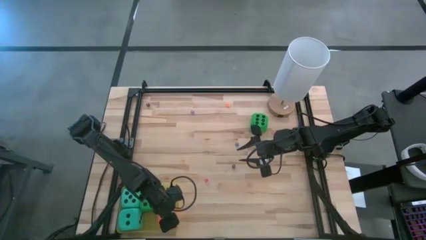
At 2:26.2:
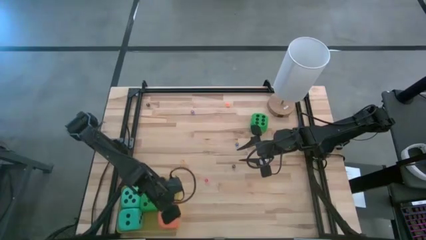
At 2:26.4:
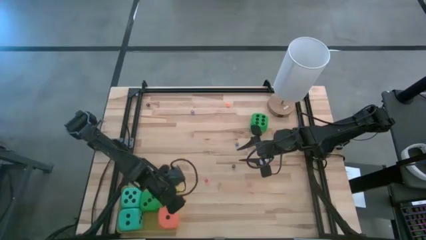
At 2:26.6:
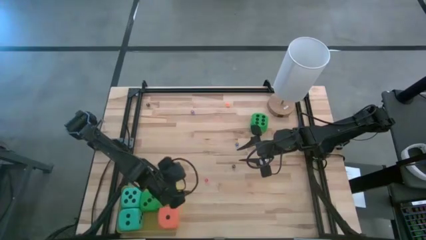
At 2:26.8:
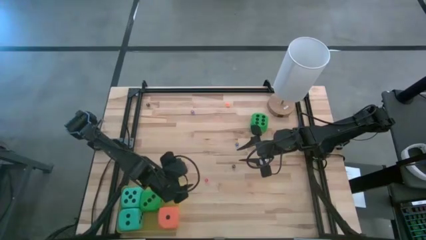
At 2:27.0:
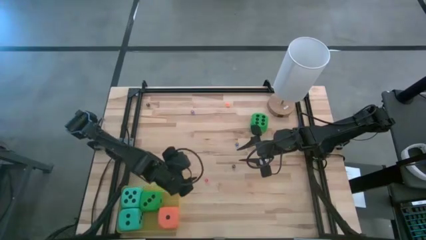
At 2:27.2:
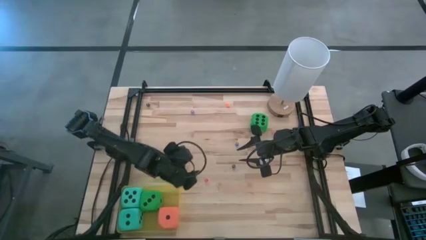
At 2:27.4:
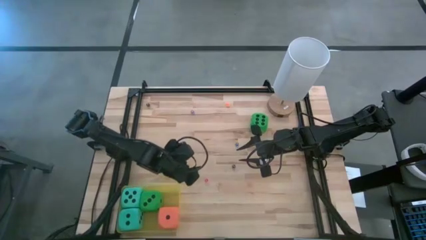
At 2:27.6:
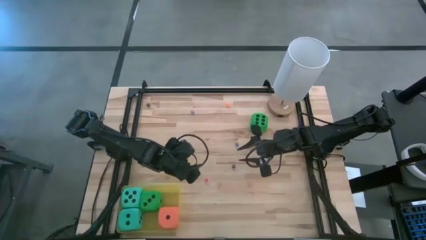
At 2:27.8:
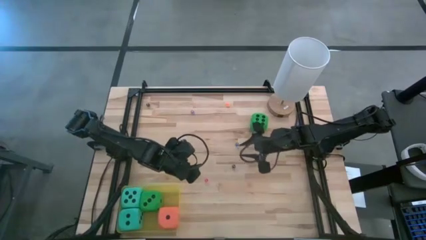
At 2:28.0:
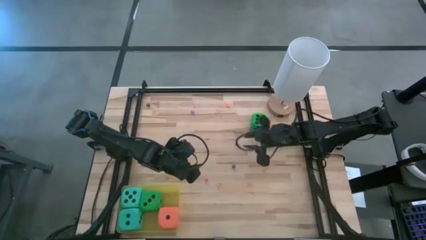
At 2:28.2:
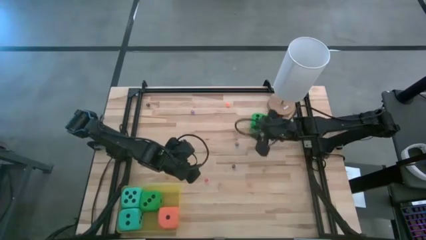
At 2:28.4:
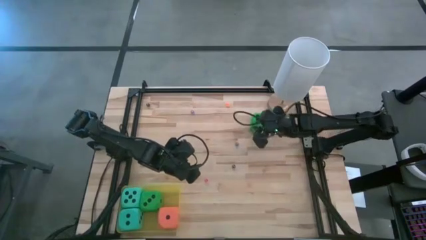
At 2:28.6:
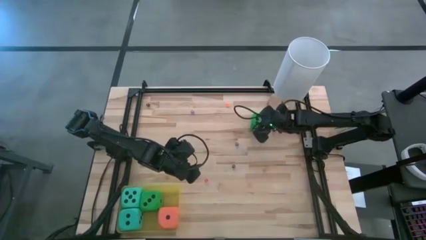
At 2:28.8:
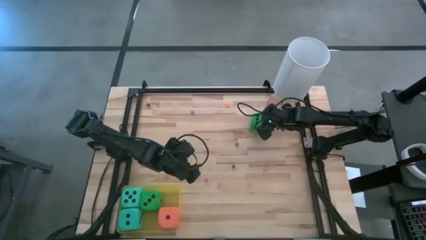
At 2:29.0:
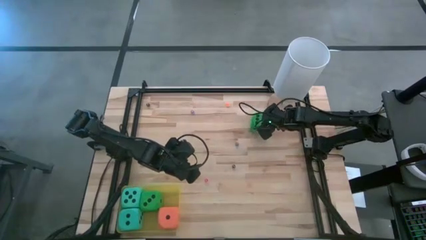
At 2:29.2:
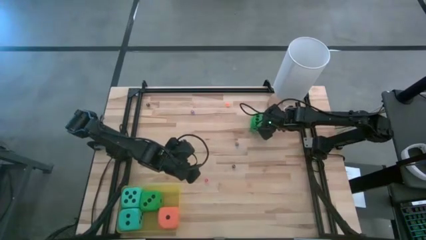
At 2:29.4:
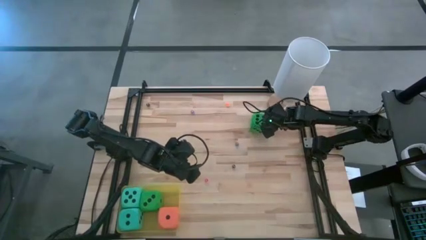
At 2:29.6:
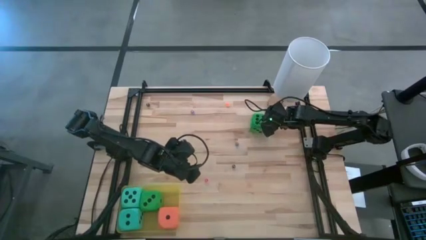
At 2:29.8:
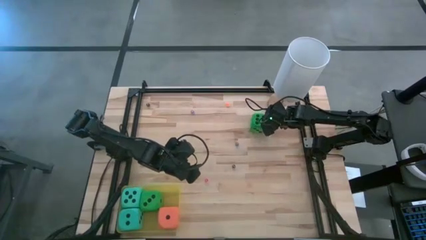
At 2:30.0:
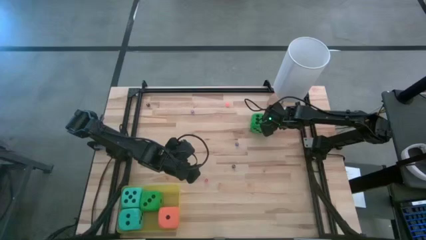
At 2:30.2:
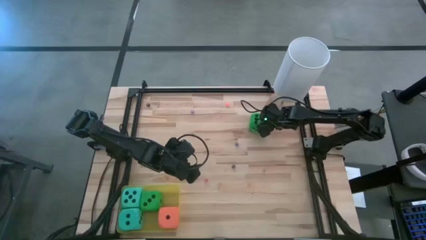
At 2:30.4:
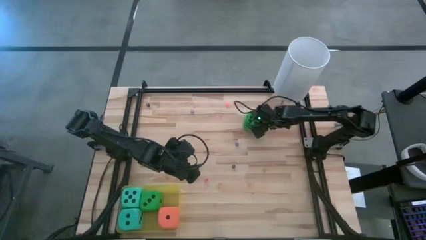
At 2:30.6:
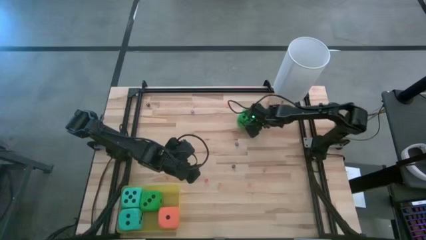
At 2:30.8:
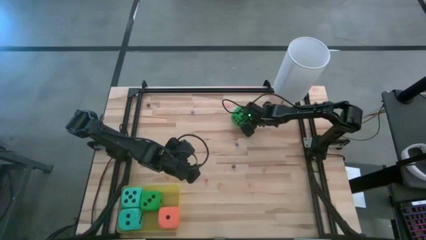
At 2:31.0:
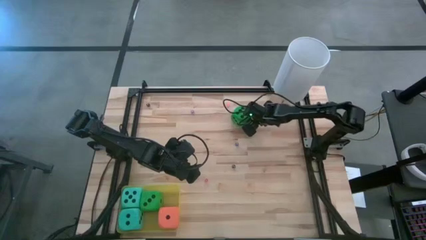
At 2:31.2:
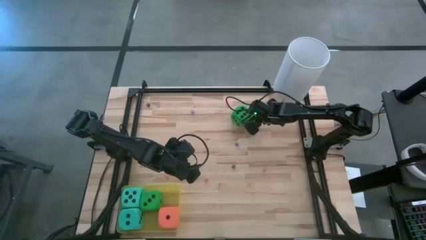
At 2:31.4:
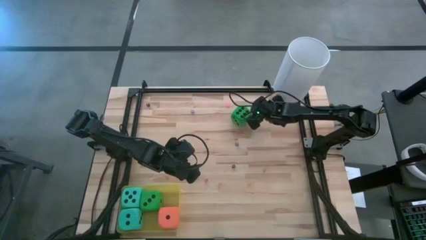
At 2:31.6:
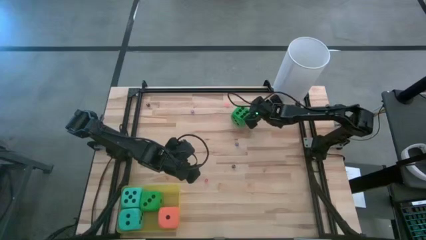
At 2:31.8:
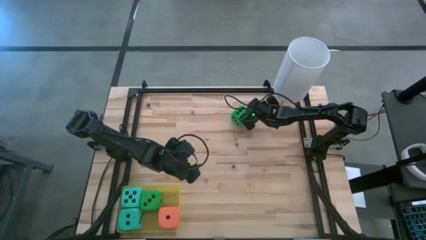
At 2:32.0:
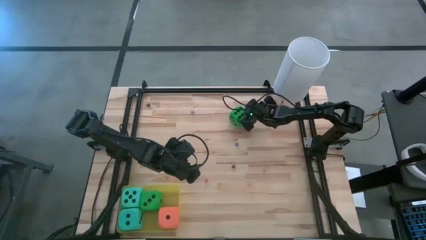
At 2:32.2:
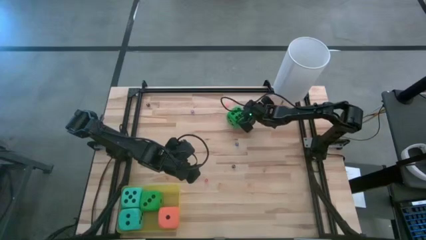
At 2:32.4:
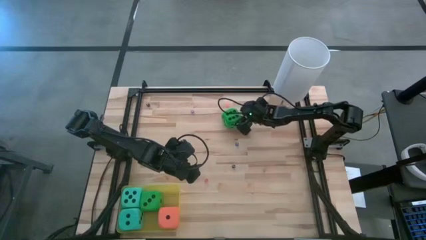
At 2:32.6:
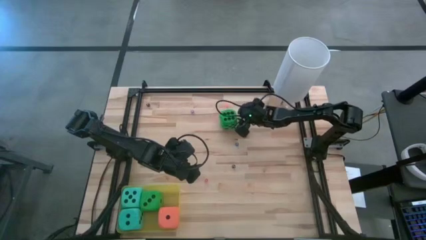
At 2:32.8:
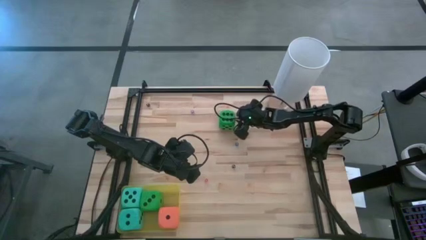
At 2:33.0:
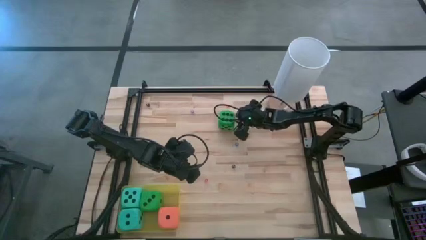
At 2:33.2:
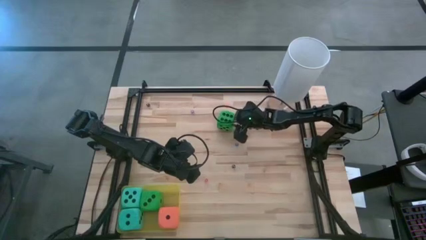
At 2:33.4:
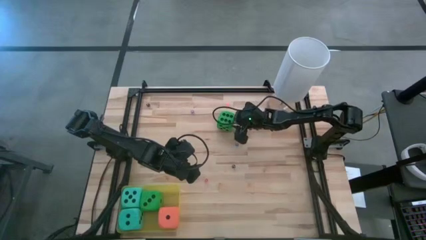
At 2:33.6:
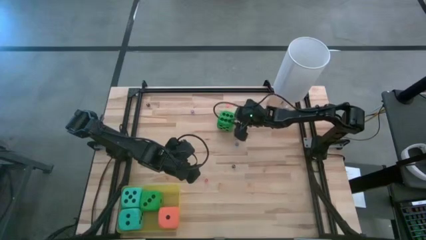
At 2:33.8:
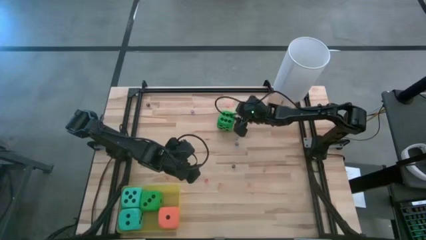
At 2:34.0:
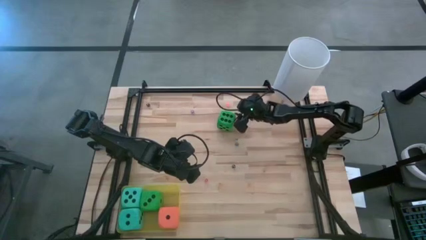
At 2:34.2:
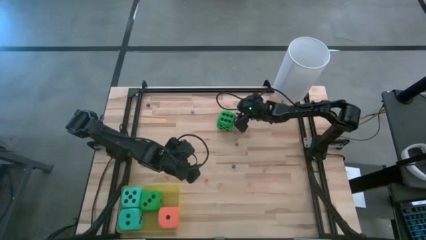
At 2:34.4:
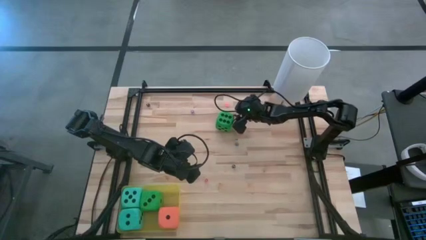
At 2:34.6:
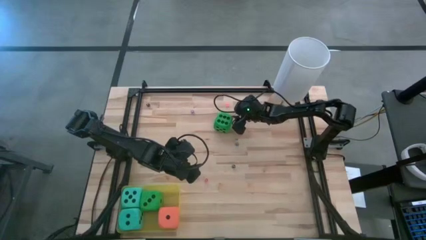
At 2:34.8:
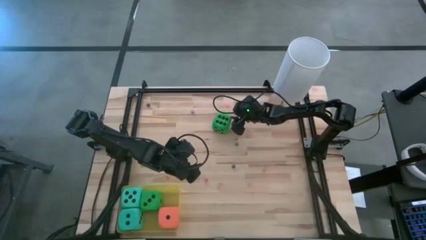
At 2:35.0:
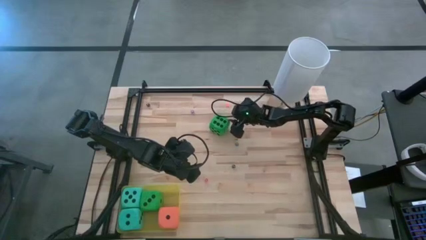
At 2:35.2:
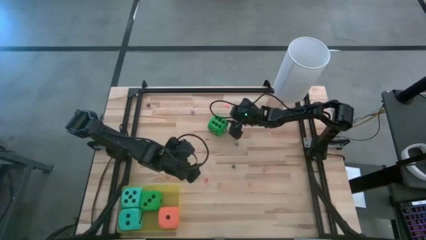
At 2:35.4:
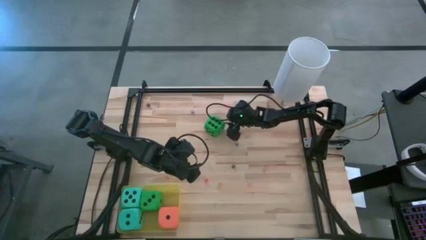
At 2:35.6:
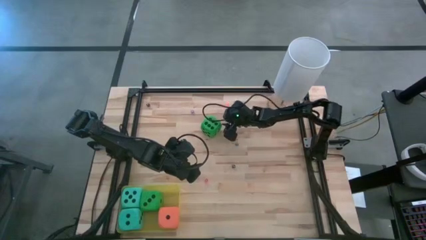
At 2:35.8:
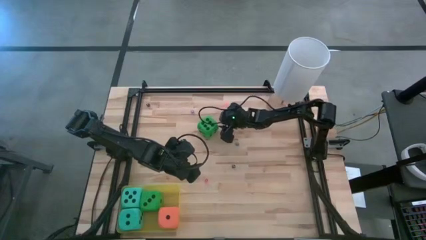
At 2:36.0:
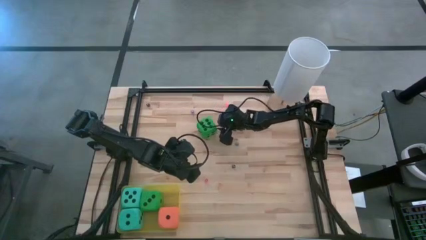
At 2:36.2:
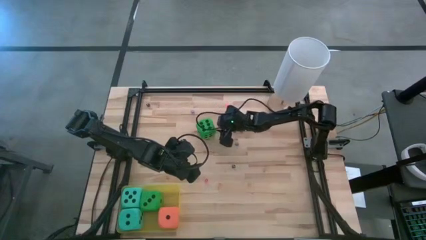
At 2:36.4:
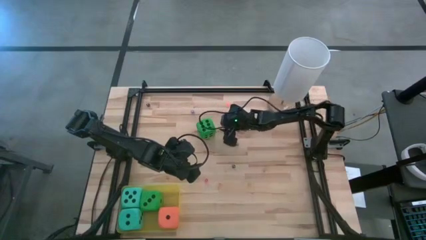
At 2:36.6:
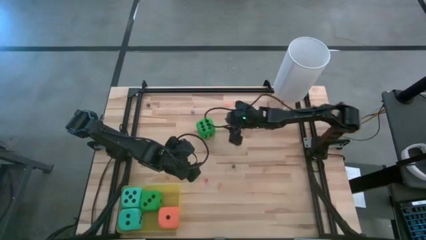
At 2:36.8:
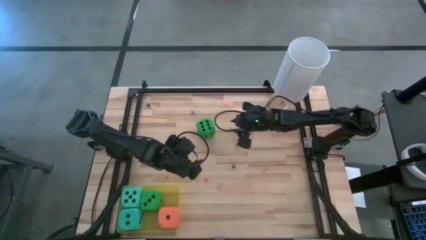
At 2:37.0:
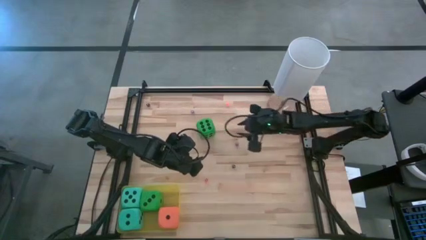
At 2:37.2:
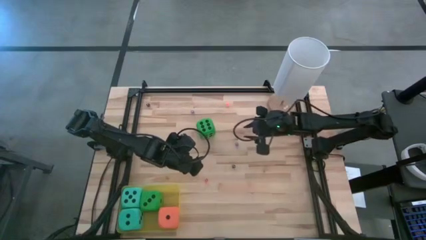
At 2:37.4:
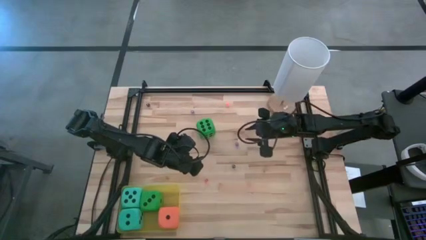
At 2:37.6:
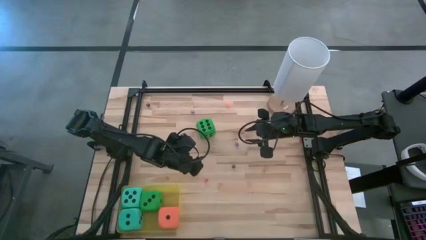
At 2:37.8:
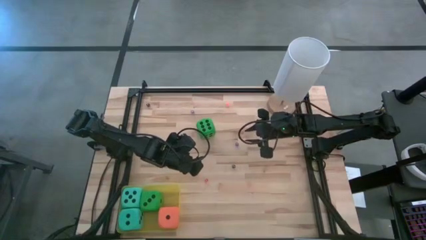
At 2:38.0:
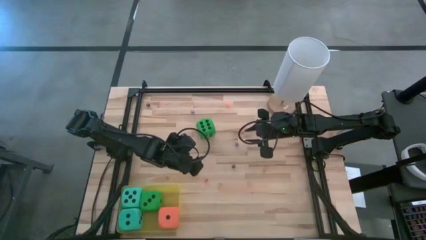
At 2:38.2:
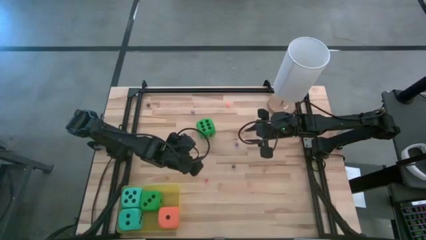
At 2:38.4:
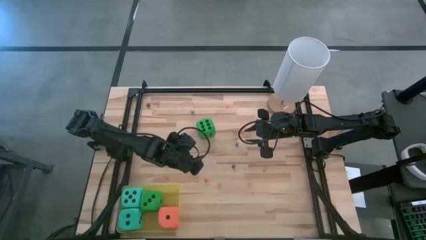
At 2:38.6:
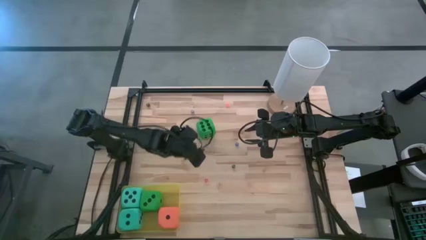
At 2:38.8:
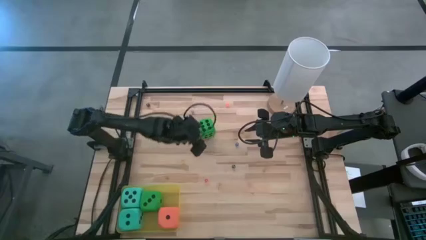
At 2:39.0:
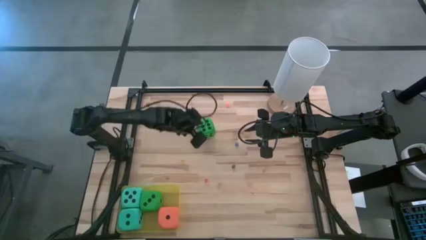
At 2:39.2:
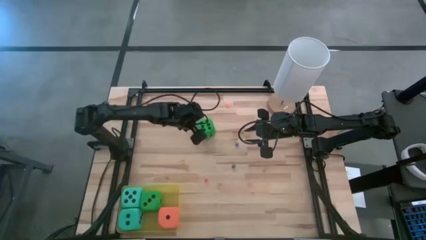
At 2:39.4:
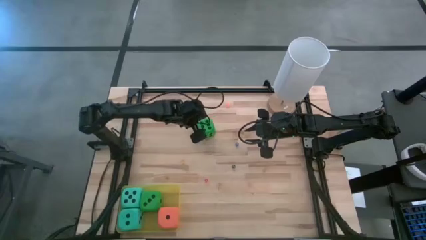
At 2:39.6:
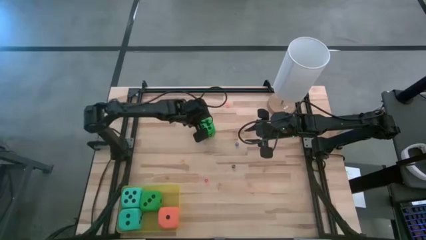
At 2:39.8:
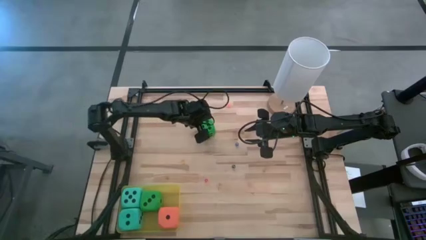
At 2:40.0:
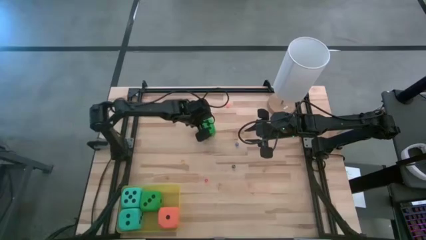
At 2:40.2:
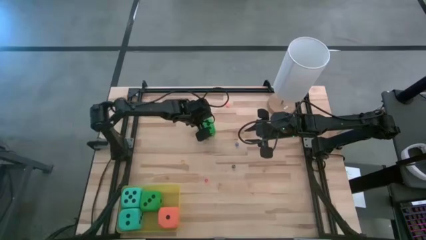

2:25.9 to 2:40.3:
Task: Pick & Place Dice
Put the large green dice into the yellow bin
